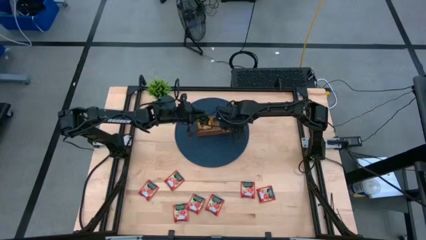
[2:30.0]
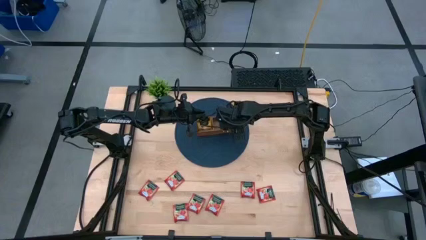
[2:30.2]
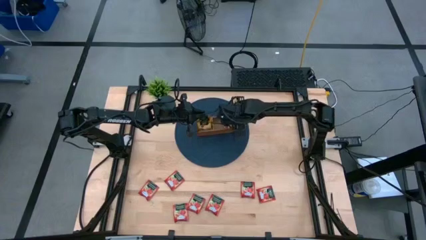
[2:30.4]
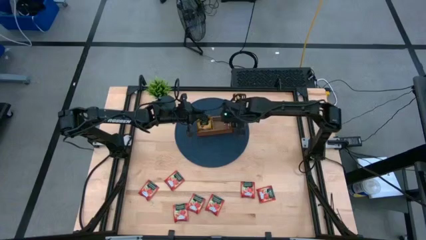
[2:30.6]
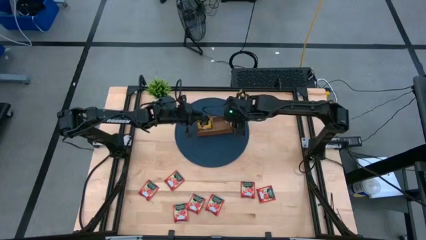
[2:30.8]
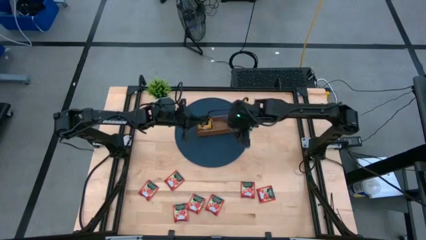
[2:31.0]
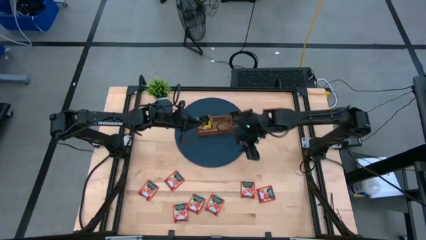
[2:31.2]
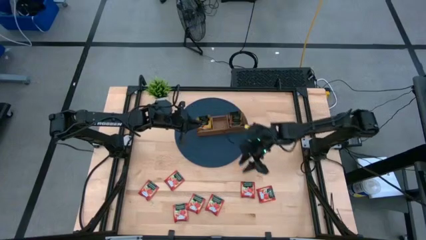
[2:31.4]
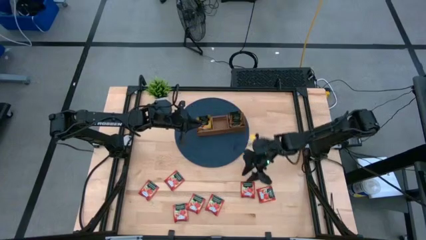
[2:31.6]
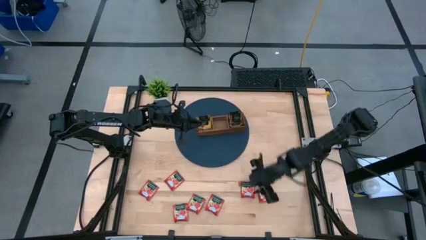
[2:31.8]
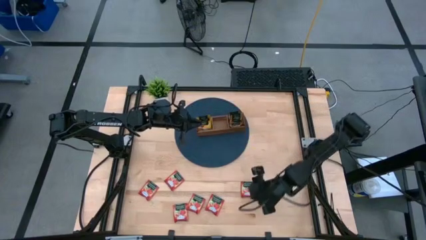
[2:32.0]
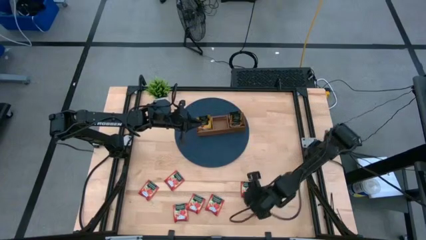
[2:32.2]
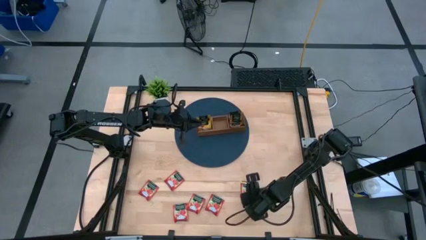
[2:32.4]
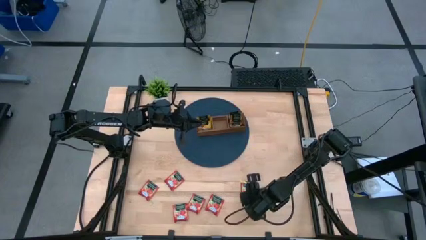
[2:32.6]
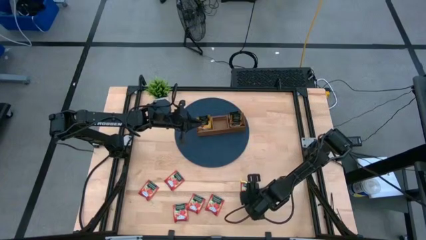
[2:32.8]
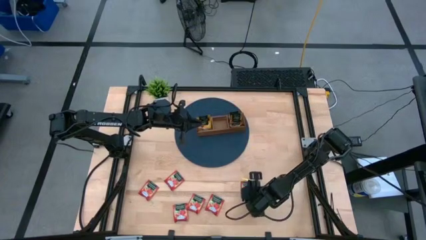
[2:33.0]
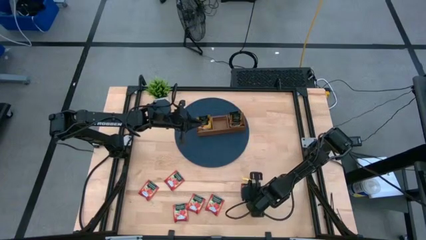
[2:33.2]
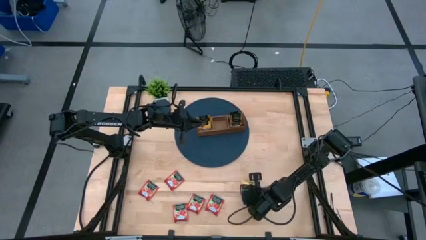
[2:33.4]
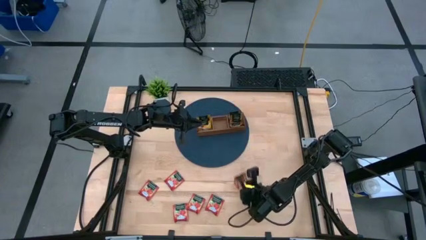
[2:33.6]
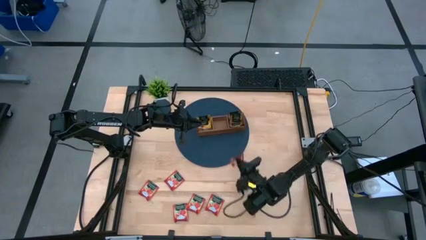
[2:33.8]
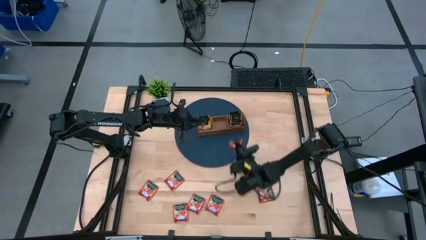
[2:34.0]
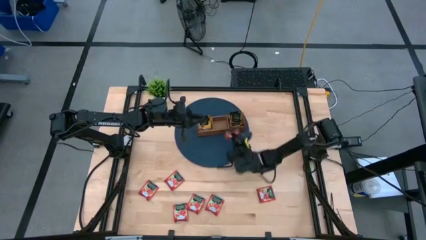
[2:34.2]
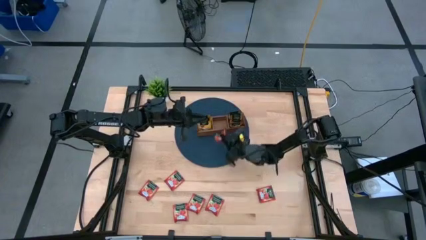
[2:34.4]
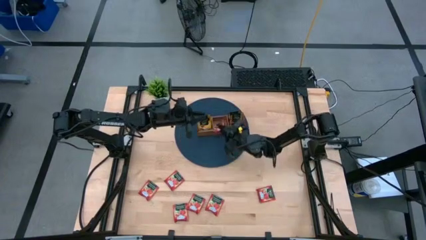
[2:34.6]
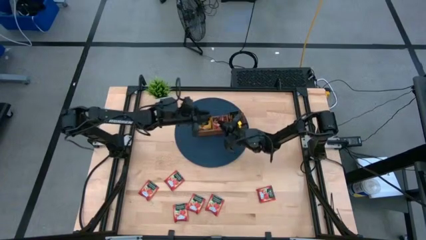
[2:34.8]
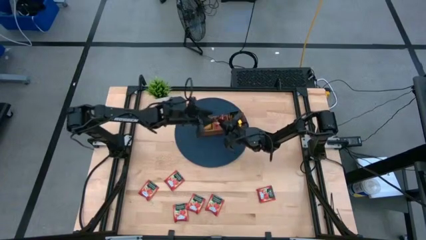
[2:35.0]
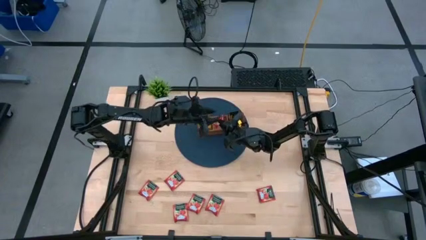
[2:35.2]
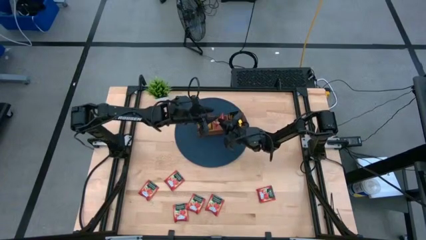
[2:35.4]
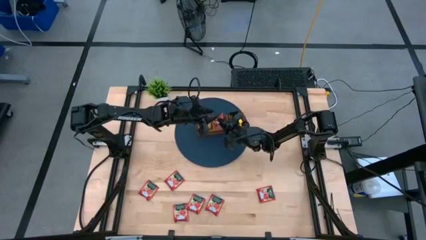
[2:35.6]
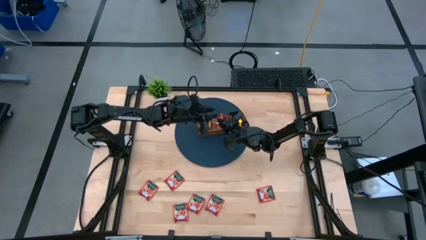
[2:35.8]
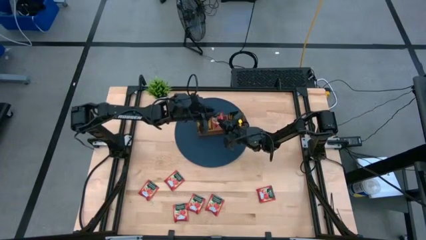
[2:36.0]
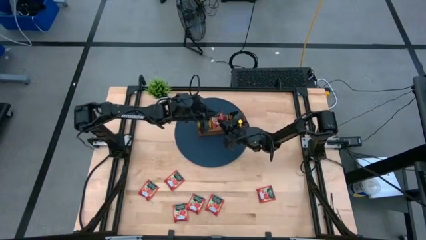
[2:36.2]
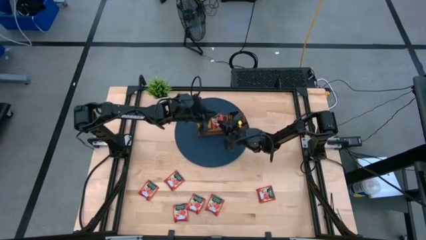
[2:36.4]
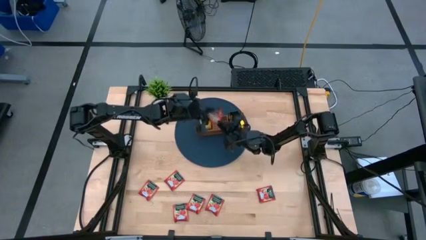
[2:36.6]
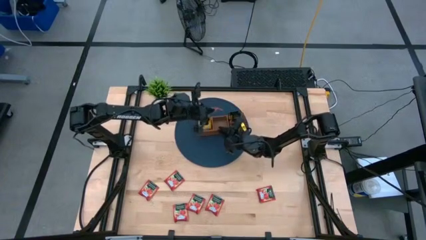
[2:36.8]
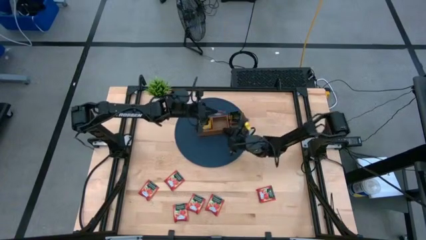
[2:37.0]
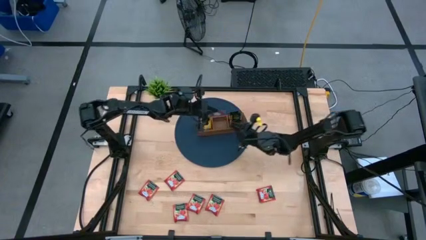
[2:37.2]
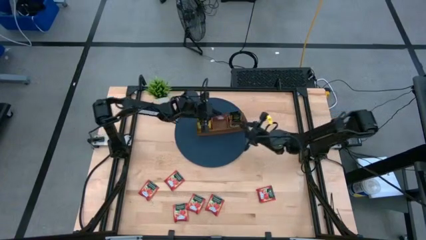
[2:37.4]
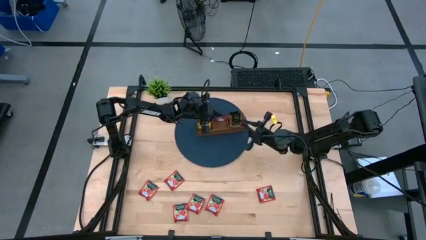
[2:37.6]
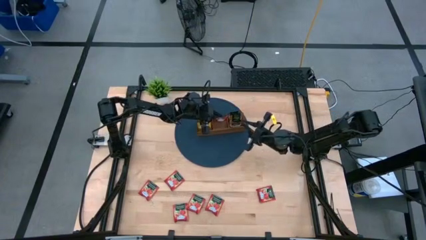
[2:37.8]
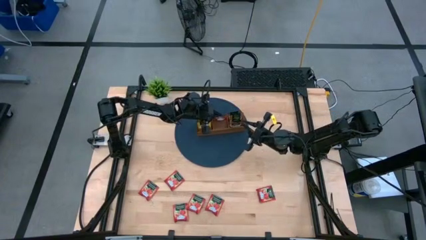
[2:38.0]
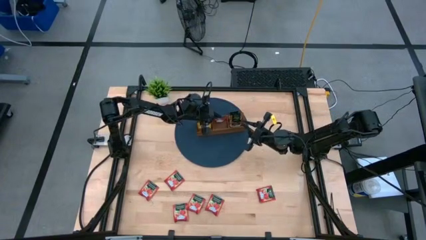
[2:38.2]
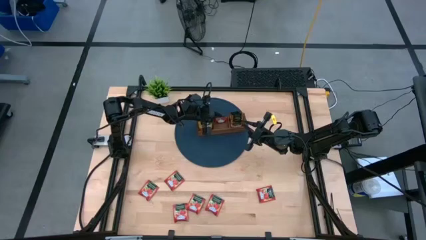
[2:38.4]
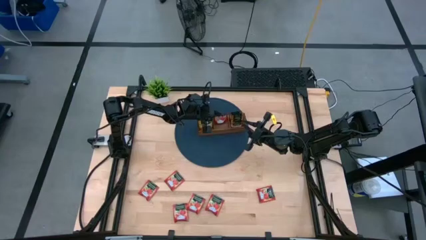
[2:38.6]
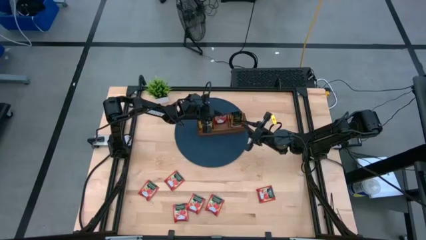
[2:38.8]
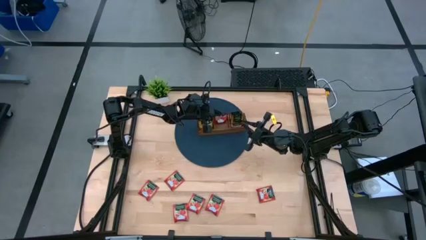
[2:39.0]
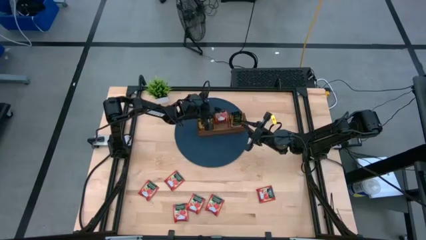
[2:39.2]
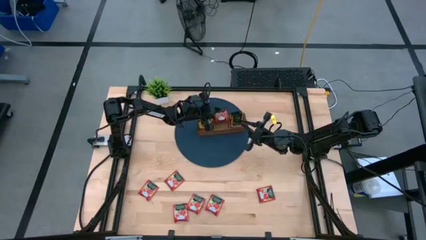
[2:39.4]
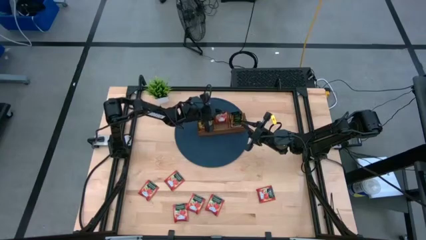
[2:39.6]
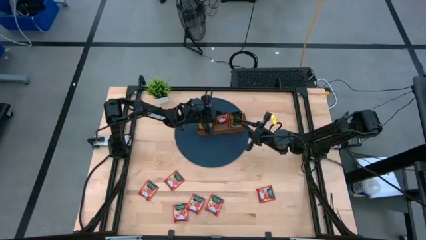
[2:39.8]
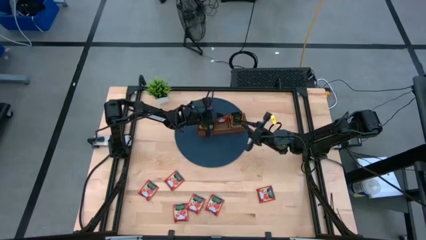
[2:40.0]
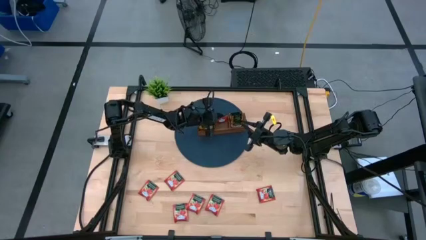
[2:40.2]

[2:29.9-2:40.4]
Task: Pick & Place Tea
Put the red tea bag into the middle section of the wooden organizer
